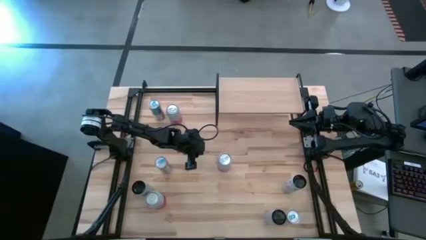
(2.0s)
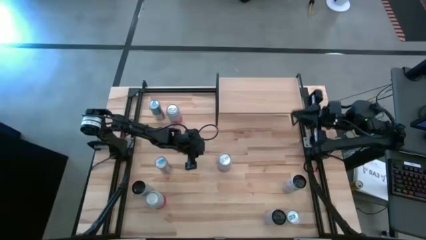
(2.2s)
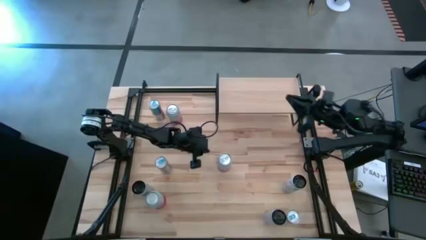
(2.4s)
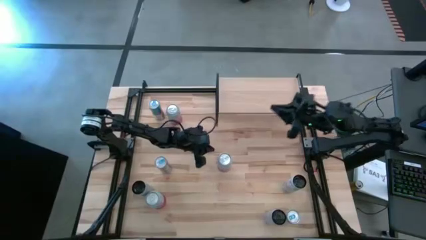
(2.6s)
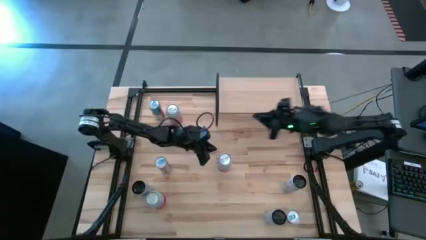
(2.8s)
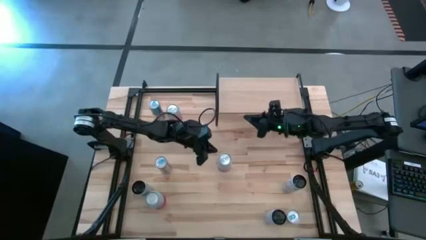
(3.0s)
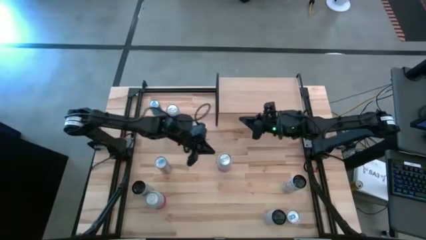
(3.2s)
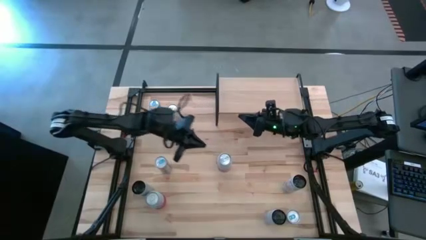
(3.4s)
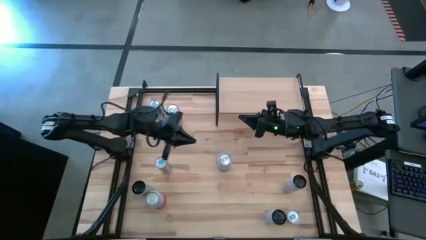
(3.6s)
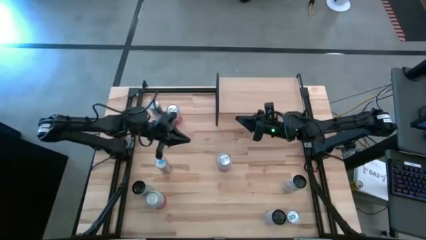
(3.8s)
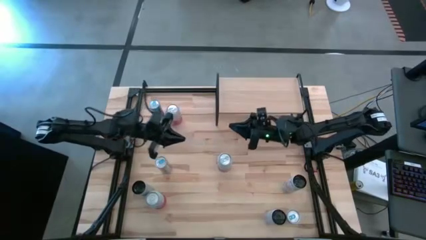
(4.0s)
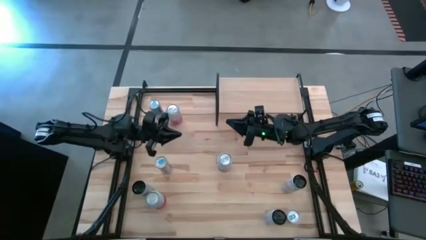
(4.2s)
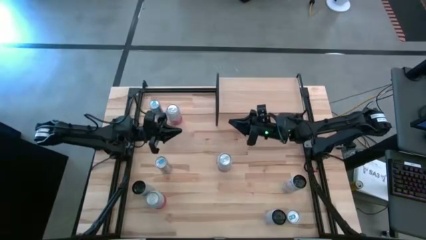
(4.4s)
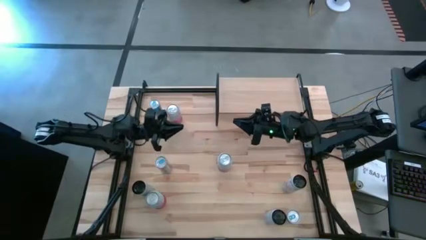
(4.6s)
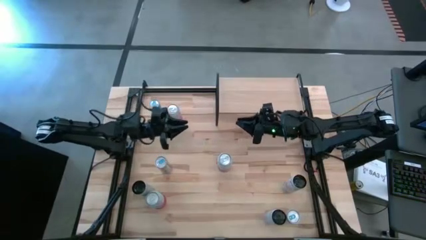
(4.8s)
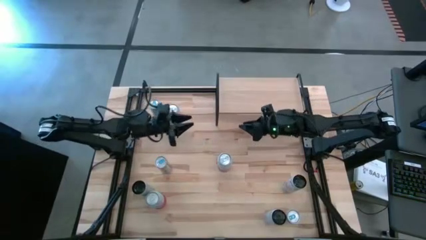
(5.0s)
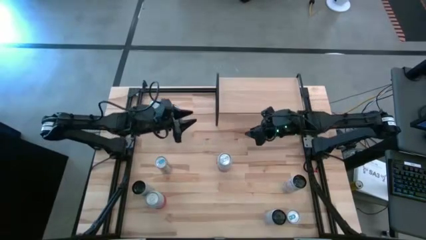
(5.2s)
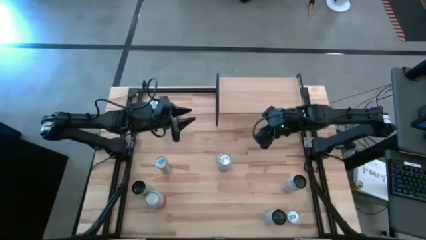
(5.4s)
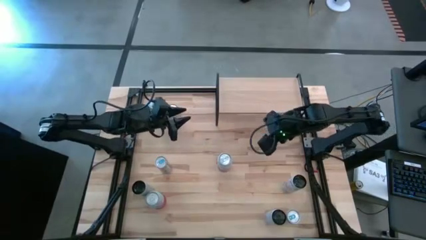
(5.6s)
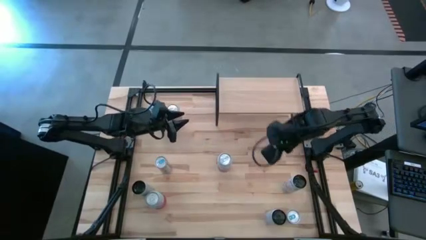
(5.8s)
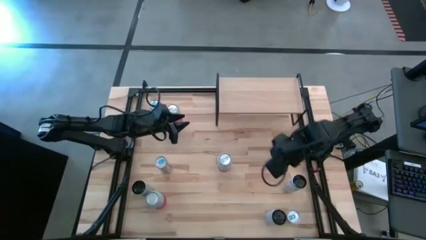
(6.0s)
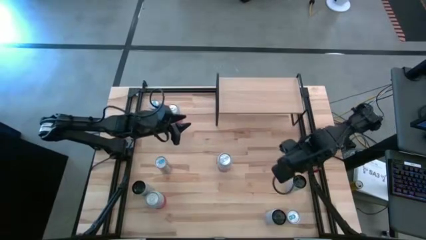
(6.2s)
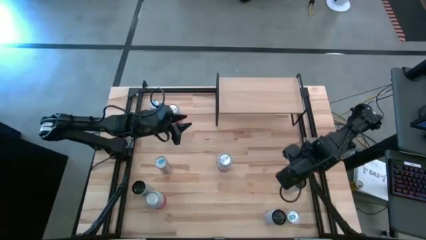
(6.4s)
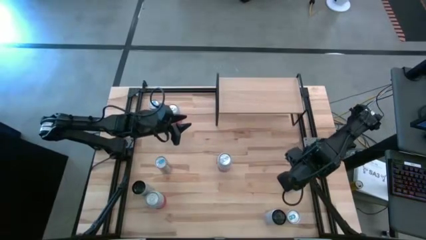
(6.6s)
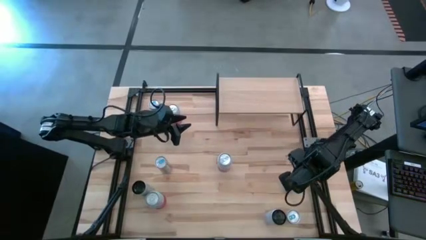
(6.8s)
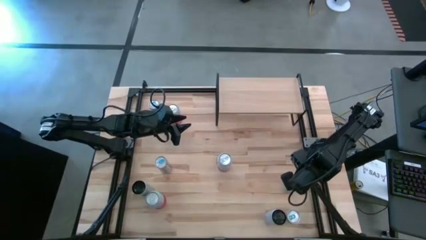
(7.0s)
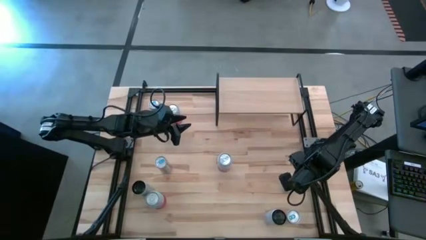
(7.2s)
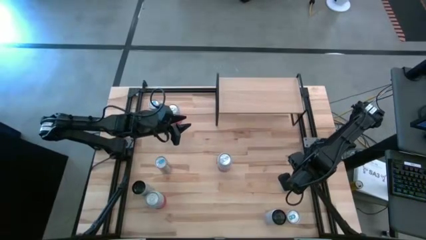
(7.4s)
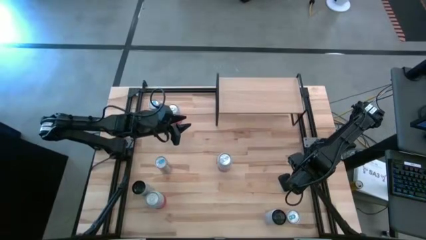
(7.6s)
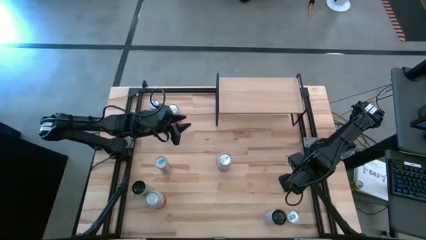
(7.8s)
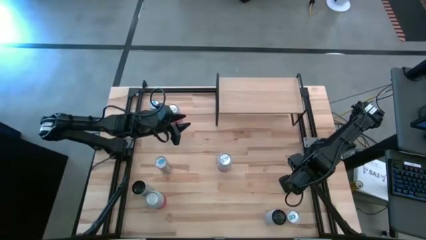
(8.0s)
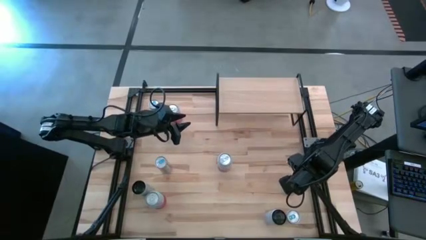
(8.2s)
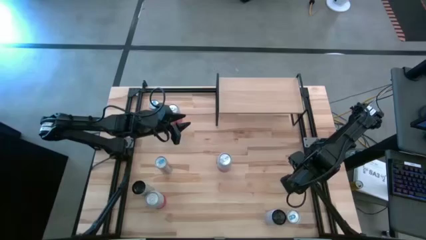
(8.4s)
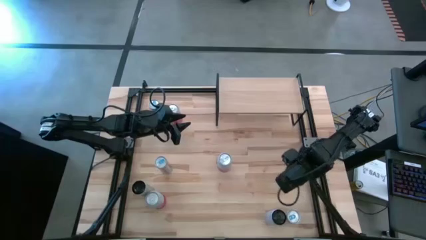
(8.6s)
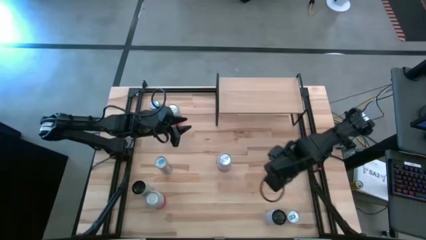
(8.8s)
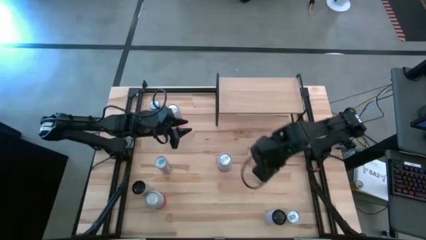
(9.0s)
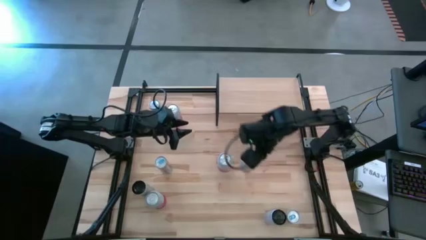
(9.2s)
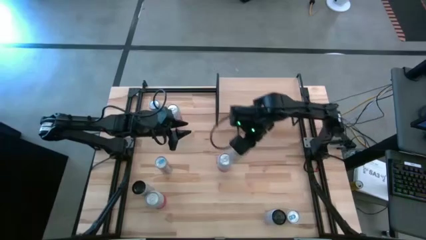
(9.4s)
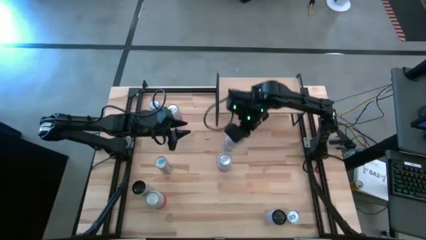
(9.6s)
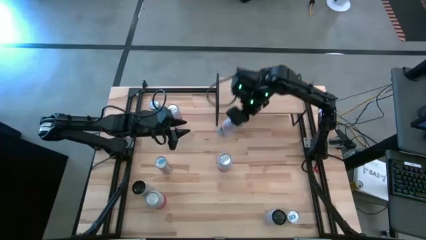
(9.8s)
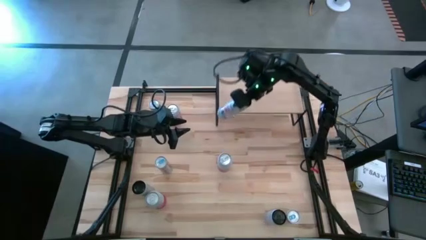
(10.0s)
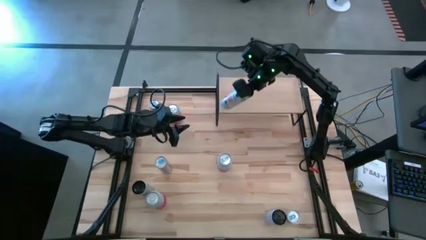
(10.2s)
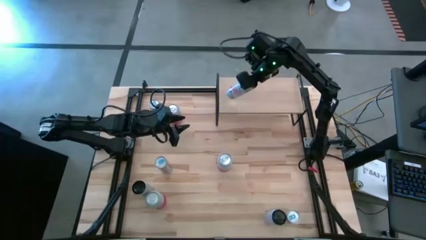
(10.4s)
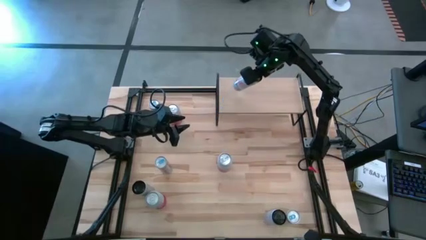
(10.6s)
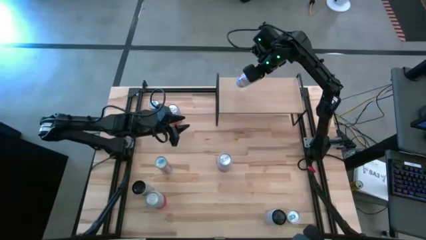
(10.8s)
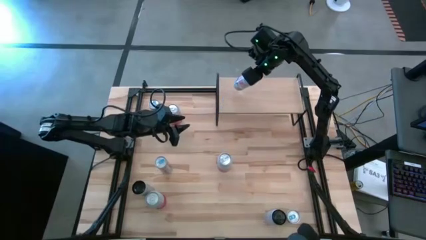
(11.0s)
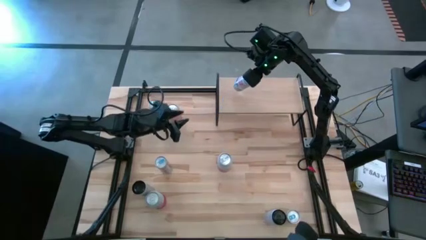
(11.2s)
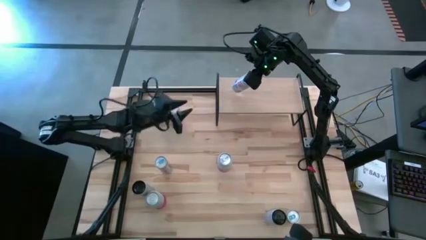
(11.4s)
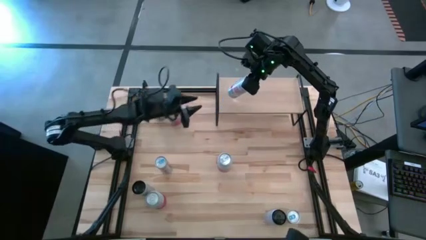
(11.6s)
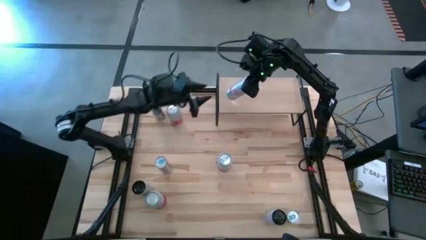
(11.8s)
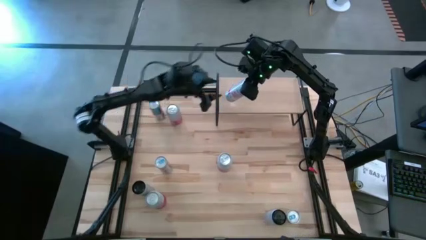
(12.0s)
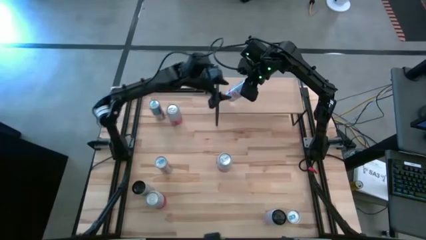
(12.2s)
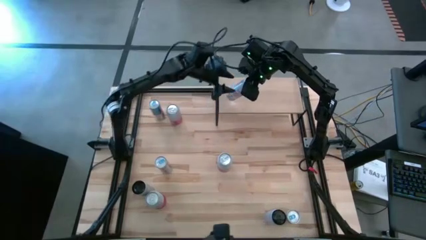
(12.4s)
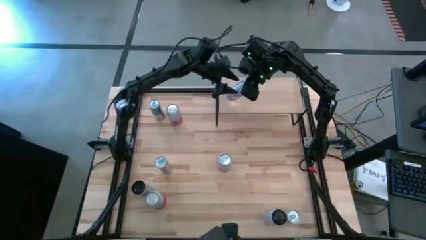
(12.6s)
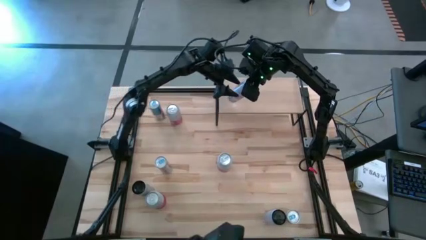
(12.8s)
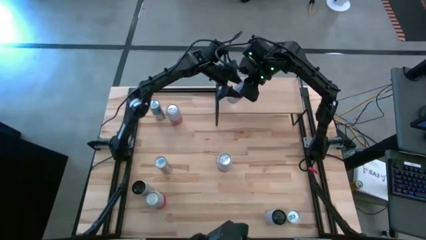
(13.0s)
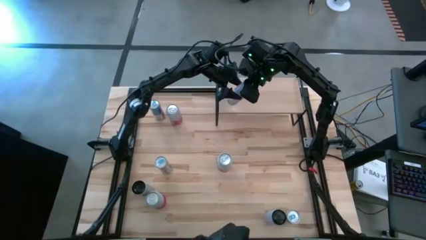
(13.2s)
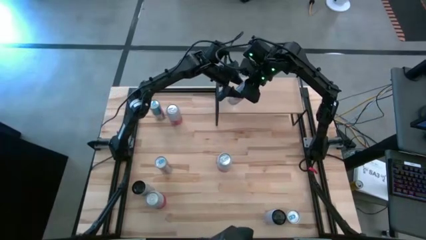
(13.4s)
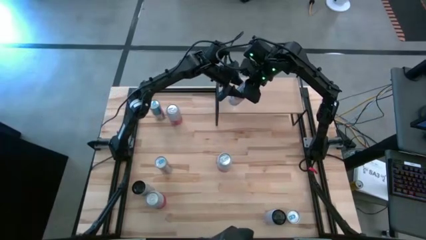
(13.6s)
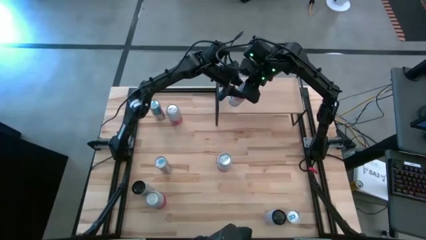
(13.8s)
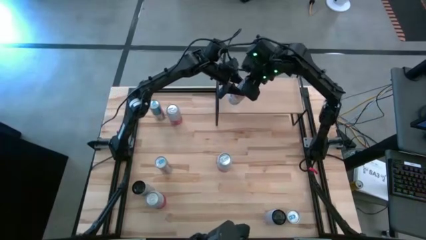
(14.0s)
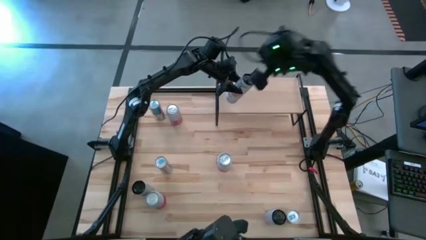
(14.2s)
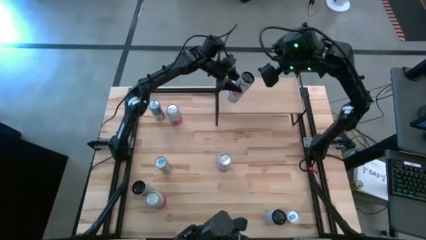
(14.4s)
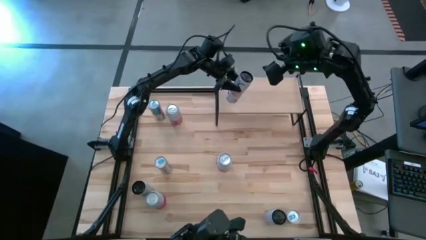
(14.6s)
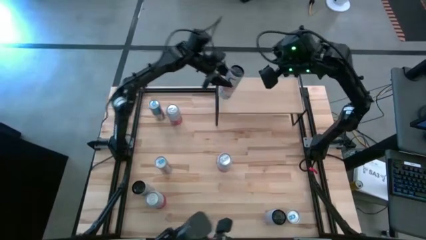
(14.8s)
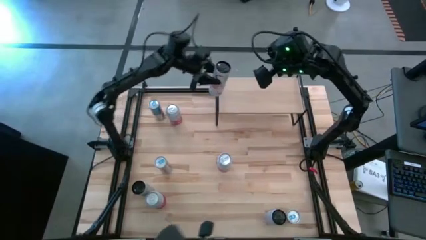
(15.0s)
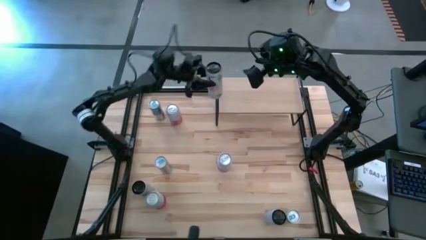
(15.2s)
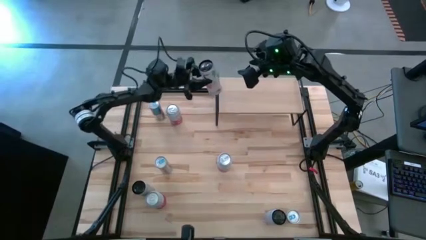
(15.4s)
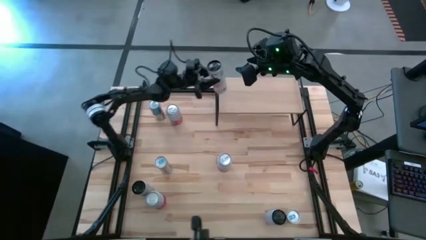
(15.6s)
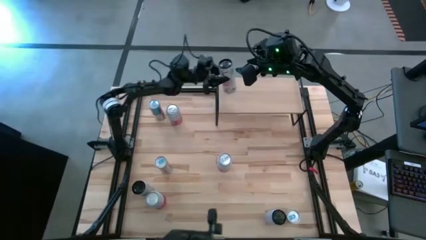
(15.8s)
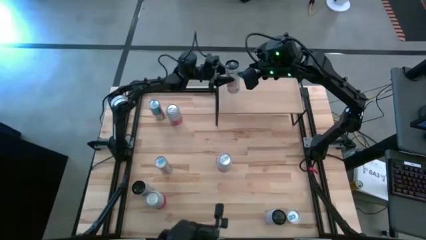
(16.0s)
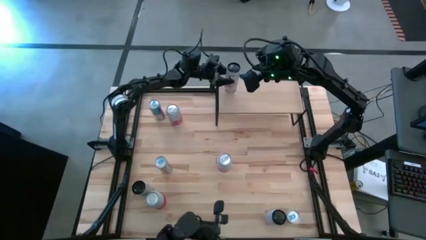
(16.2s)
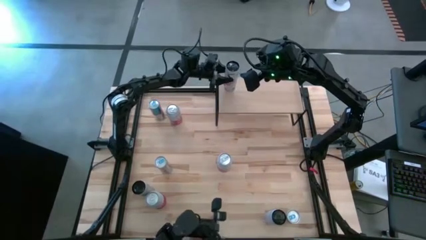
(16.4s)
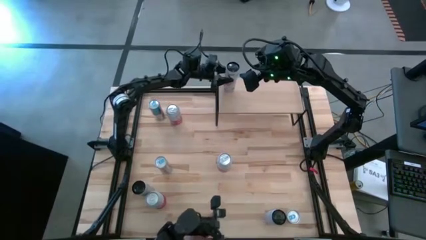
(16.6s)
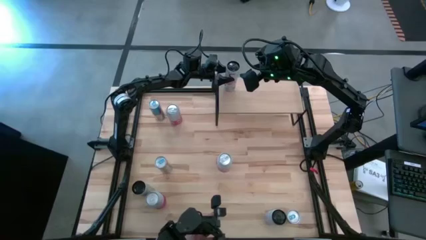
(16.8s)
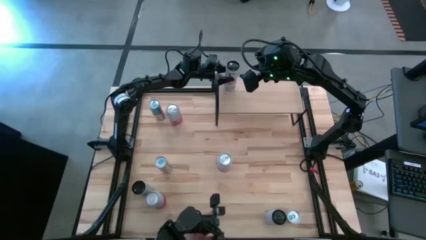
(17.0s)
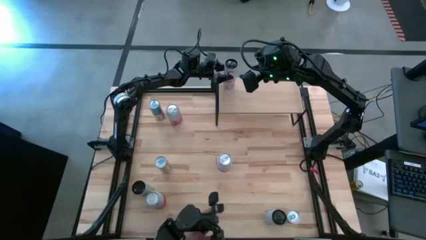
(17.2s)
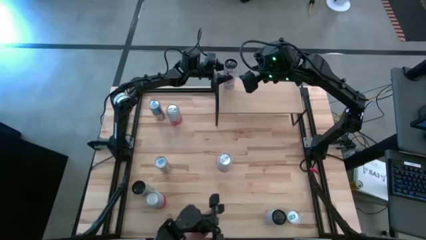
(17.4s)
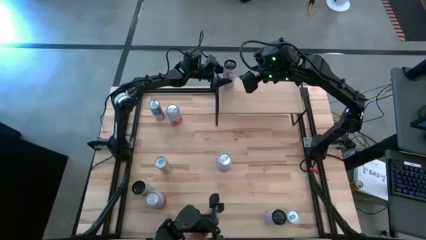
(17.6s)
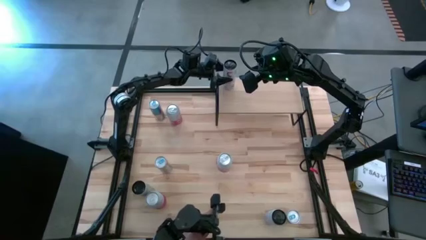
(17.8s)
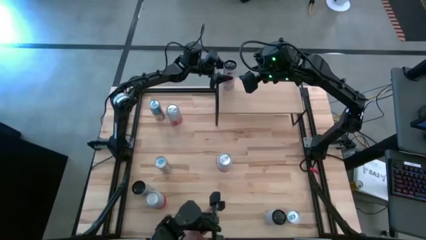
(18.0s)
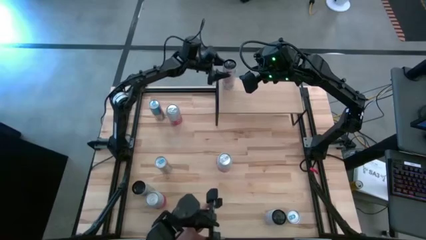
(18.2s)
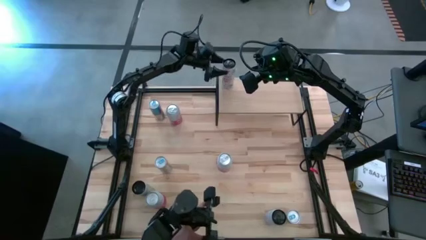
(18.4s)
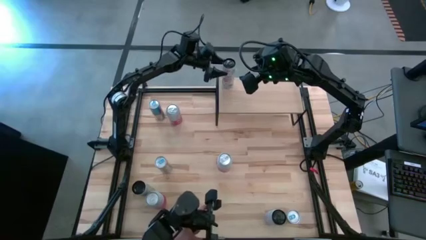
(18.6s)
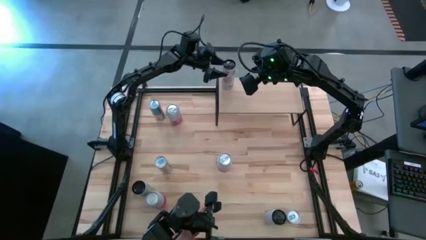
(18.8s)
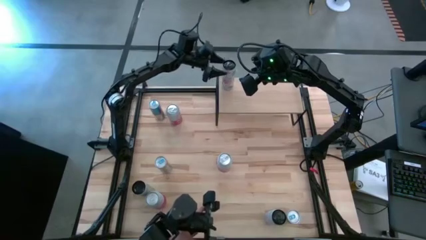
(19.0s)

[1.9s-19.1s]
Task: Place canned beverage on shelf
Put the right white-pink soda can on the shelf
